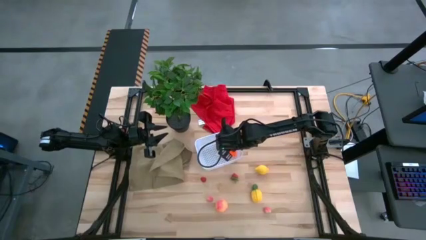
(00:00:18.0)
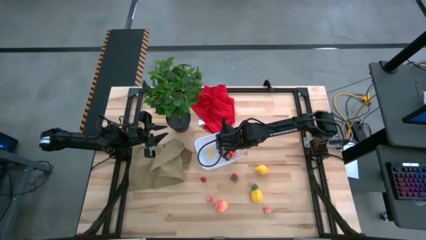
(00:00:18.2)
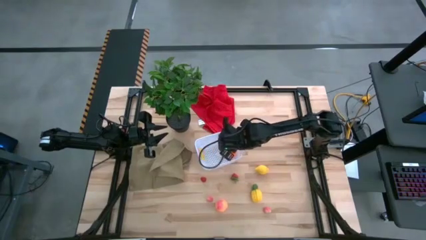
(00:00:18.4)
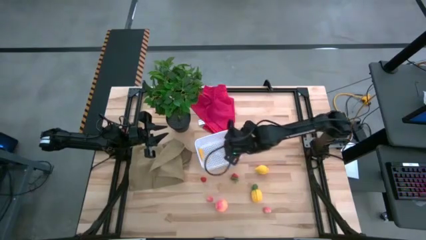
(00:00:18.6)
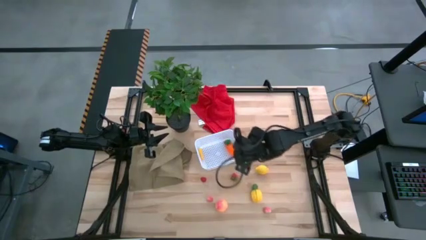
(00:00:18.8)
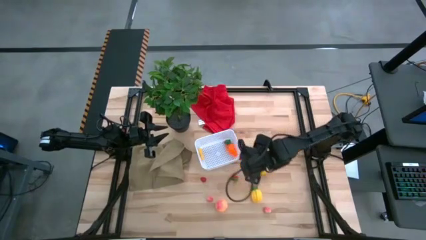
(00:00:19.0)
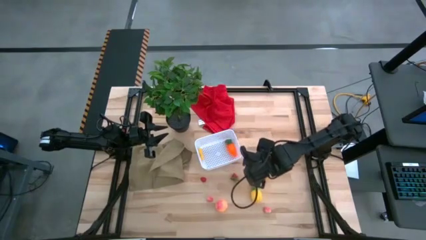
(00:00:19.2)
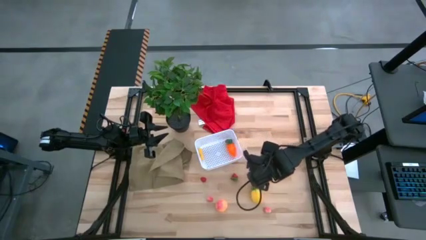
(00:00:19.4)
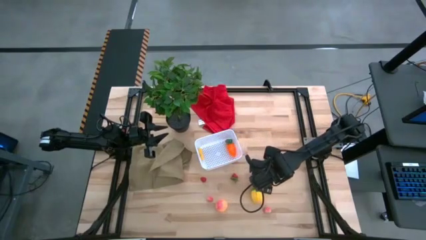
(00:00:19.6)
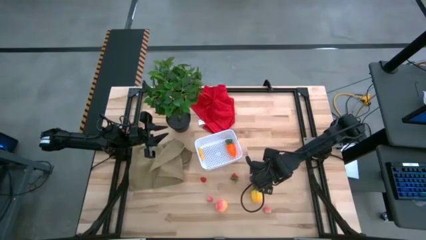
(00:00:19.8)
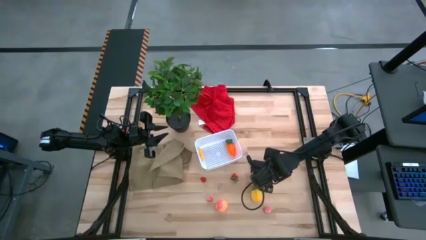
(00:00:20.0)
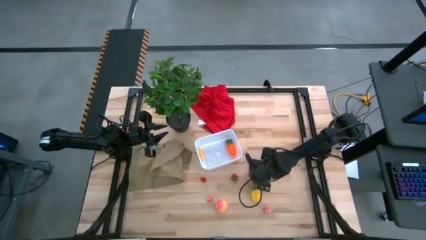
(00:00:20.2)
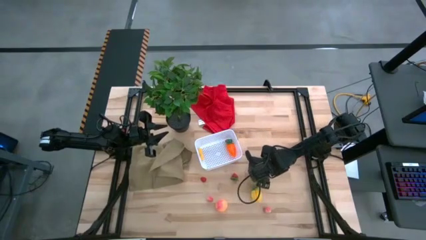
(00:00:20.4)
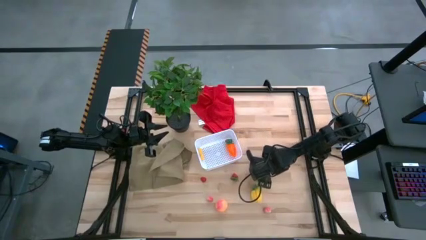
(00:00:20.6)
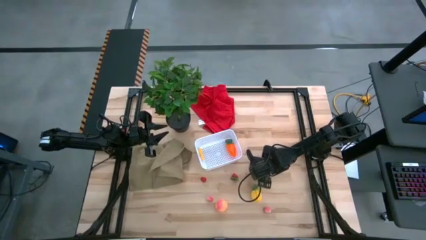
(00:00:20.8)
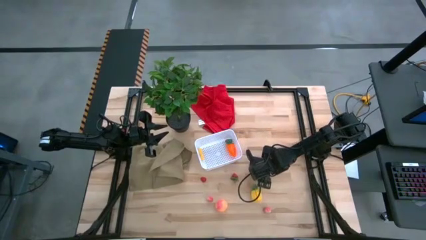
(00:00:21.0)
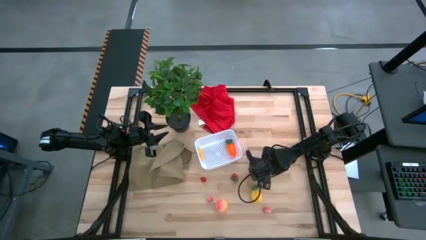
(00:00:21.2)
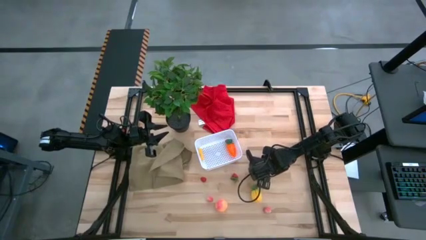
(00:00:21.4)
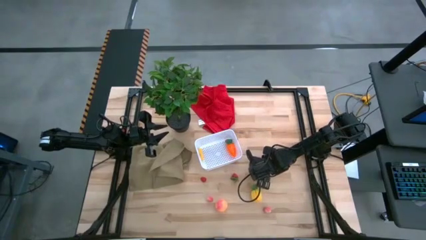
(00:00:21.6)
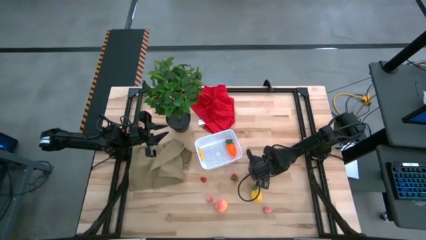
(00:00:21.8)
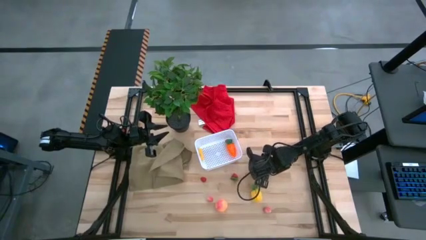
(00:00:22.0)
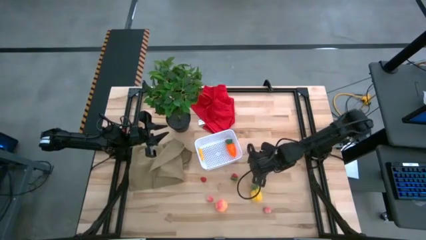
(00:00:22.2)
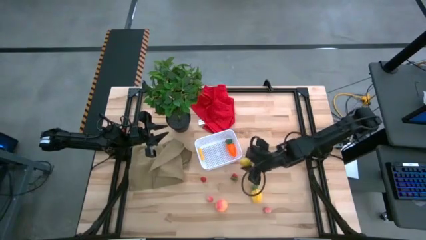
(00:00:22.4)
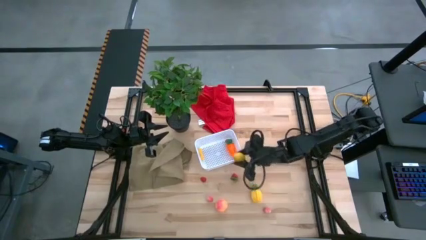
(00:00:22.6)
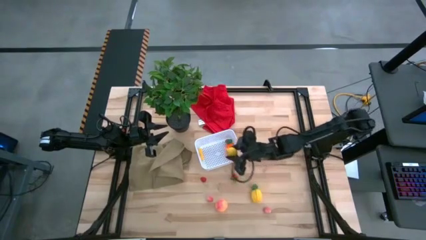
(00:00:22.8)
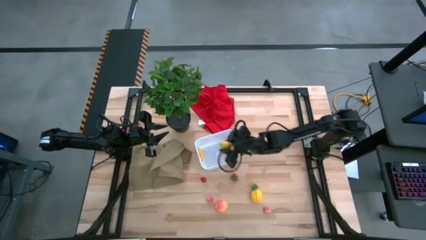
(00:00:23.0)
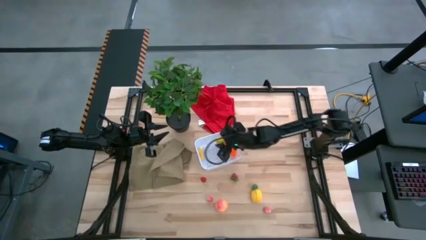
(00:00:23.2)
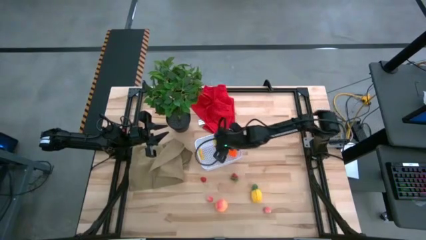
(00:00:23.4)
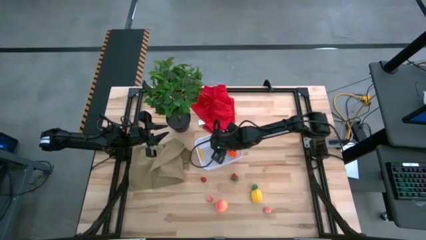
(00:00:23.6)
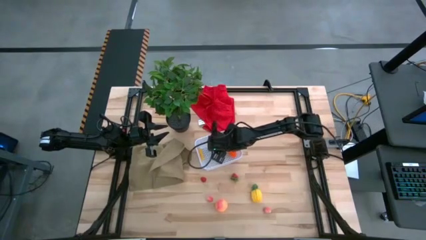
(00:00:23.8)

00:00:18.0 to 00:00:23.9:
Task: Pick and placing Produce into tupperware
Put the yellow lemon into the bin

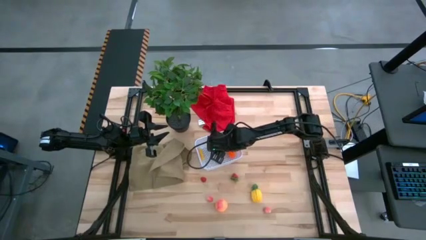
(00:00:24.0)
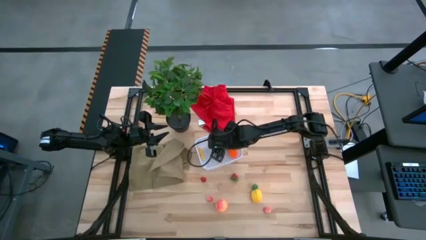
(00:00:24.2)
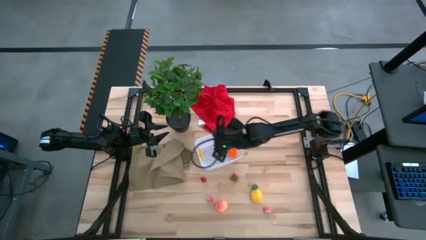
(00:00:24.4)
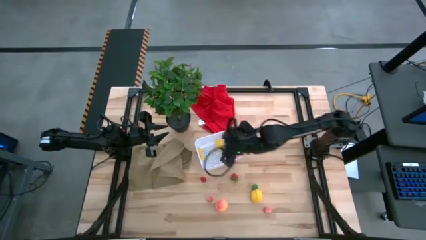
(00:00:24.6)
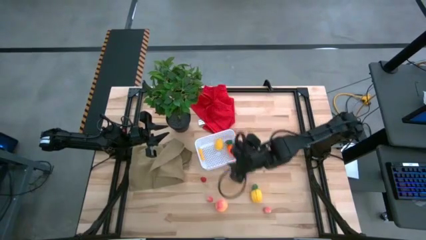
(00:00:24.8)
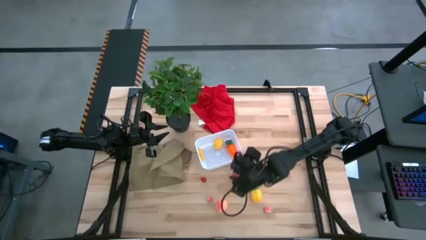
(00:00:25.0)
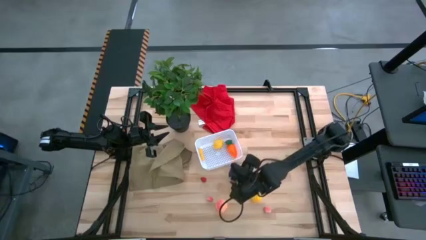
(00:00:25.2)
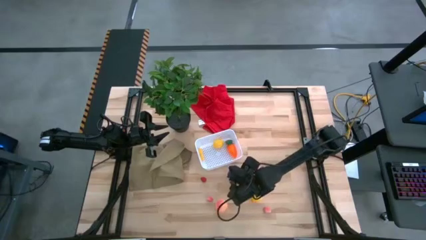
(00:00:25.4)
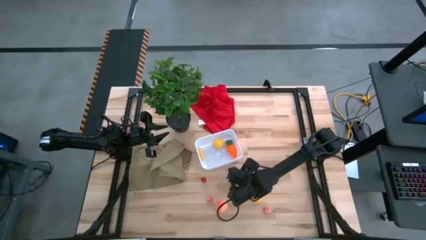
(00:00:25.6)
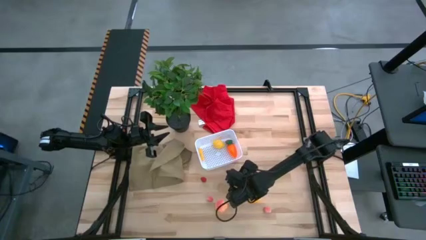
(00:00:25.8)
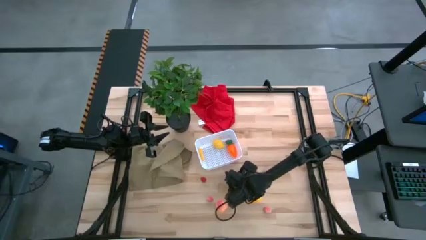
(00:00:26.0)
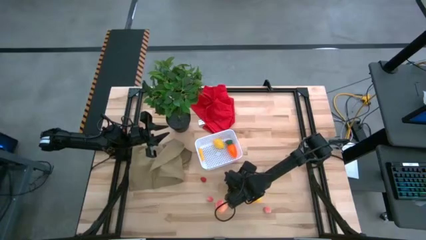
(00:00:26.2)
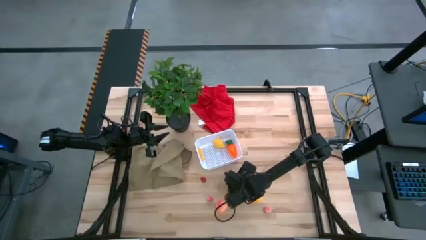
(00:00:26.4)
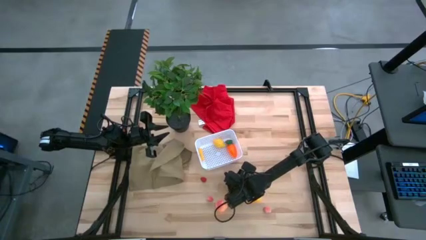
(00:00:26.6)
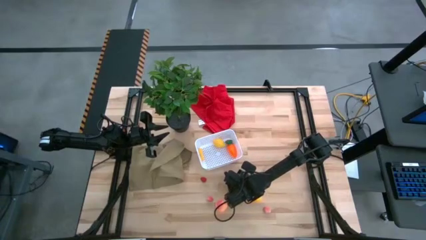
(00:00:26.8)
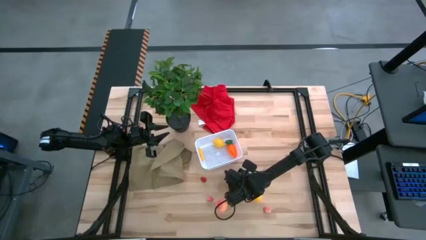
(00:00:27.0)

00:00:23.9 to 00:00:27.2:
Put the red strawberry into the bin

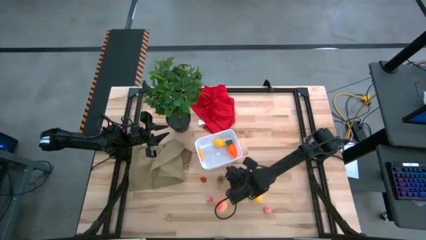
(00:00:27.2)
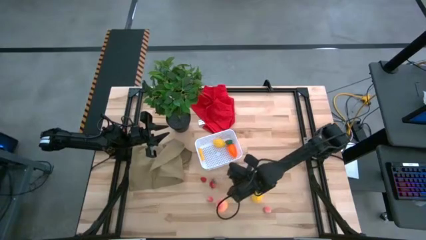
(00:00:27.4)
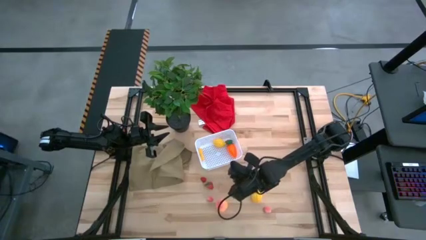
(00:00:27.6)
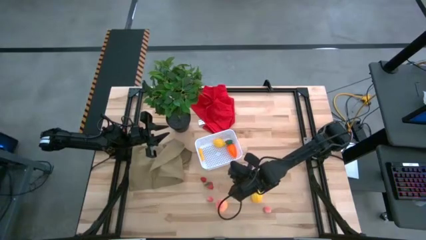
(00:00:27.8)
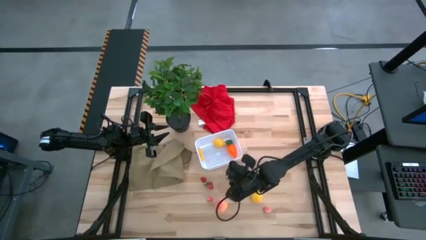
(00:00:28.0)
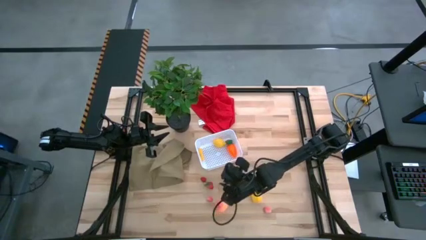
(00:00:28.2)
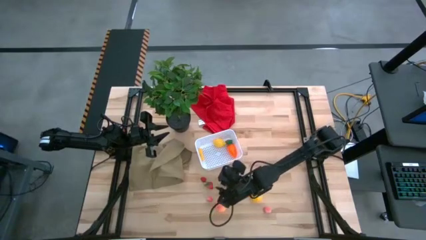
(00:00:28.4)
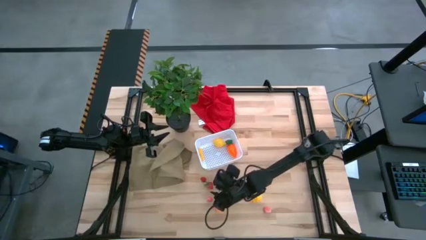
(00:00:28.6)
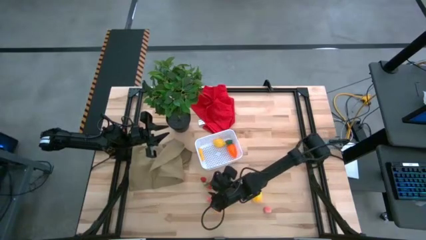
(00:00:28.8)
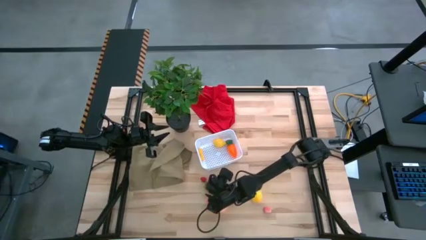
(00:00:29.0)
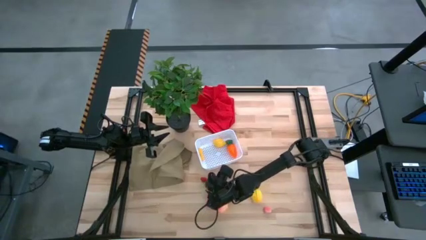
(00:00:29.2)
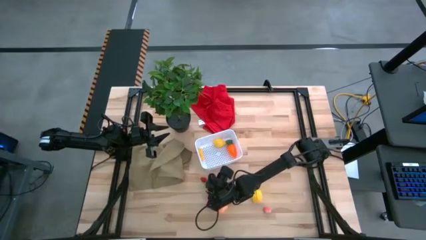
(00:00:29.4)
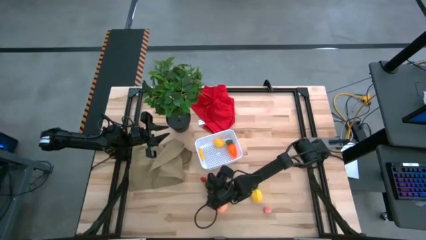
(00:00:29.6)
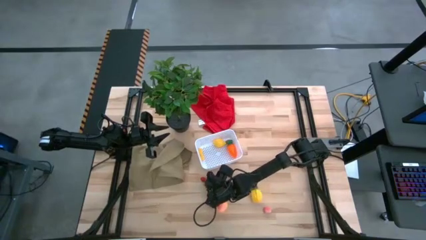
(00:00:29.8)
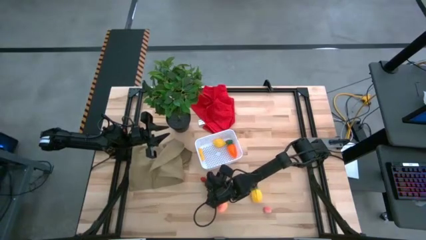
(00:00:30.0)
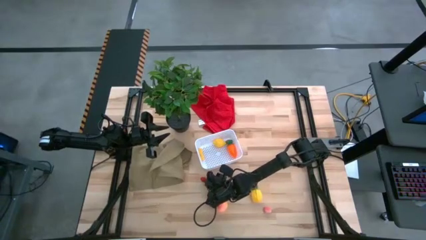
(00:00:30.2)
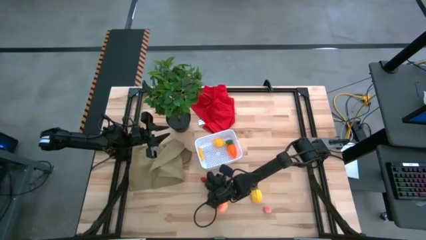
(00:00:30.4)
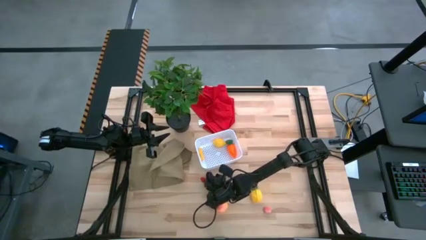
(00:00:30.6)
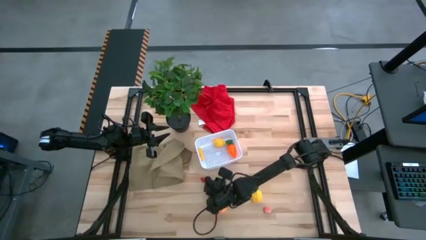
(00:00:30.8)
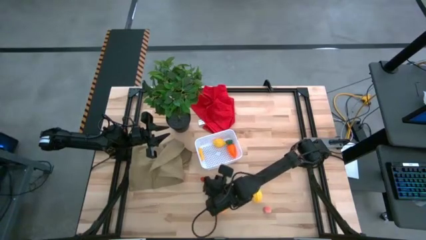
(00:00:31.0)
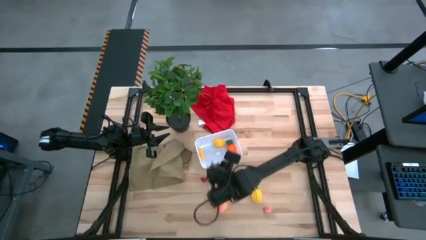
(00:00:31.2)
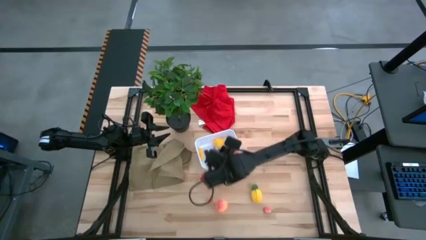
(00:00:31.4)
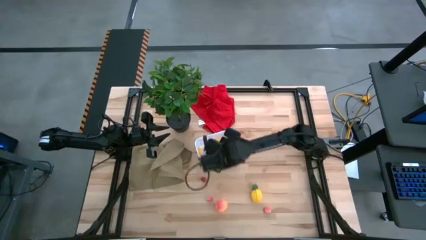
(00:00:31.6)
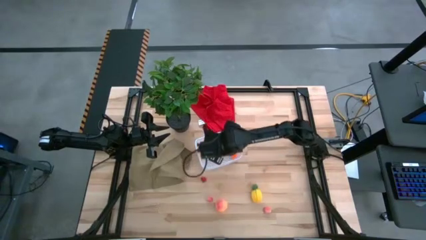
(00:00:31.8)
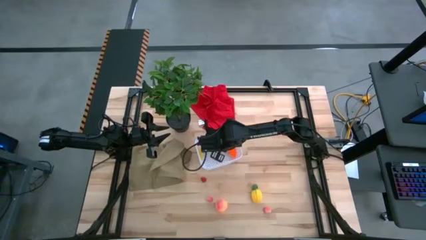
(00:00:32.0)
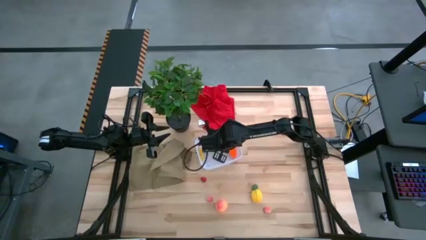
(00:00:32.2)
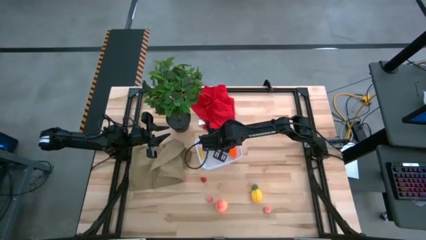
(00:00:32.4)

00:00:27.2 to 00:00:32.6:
Put the red strawberry into the bin

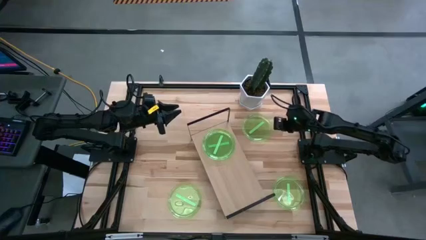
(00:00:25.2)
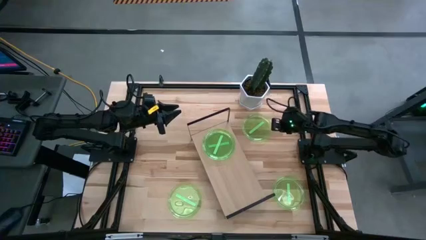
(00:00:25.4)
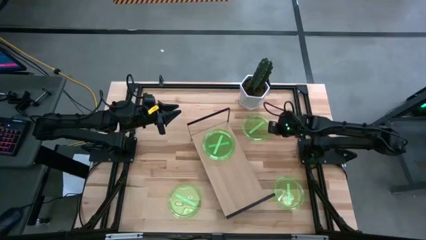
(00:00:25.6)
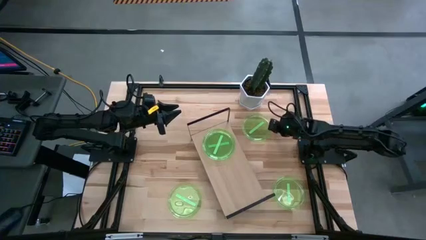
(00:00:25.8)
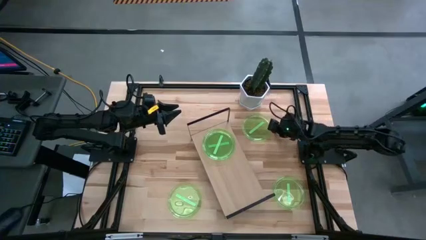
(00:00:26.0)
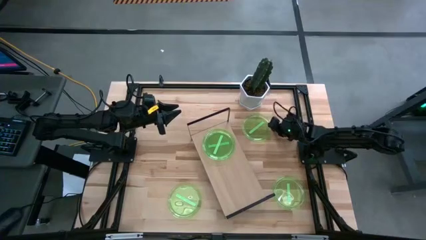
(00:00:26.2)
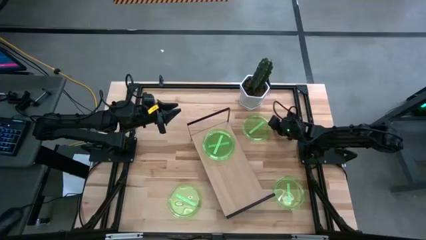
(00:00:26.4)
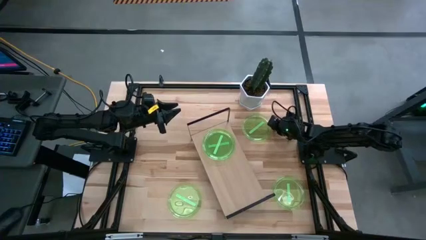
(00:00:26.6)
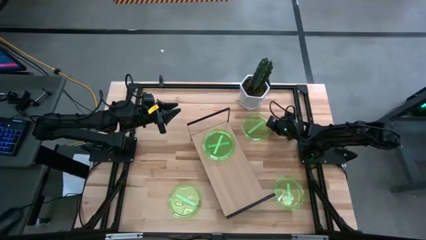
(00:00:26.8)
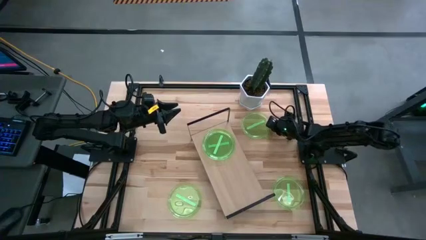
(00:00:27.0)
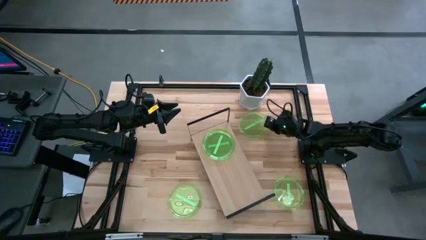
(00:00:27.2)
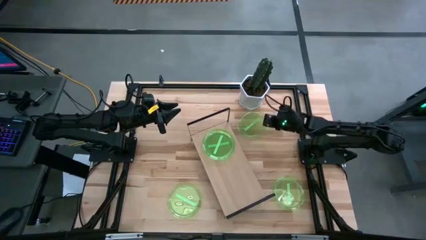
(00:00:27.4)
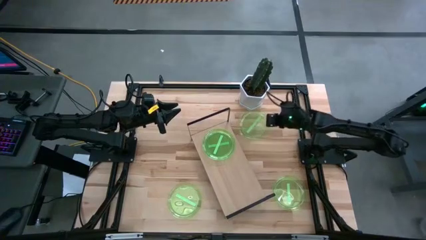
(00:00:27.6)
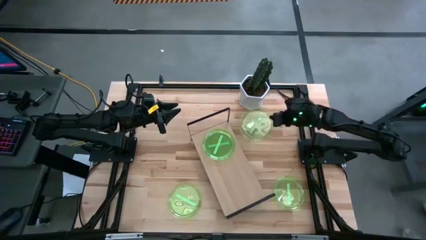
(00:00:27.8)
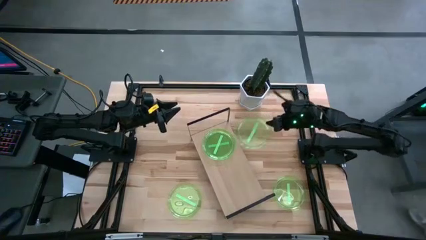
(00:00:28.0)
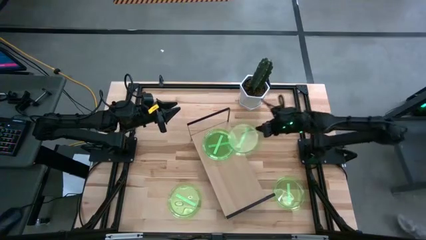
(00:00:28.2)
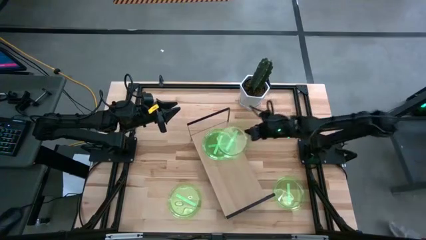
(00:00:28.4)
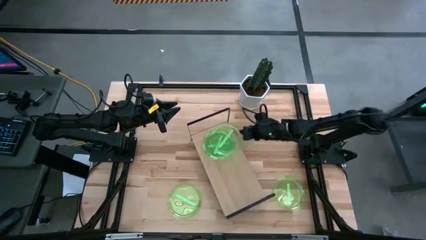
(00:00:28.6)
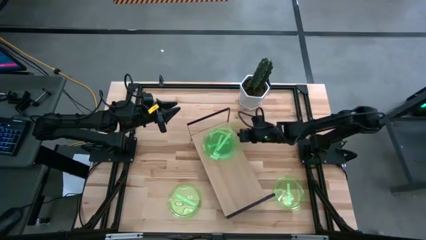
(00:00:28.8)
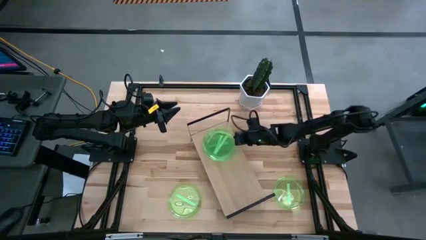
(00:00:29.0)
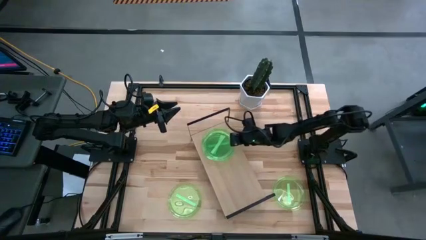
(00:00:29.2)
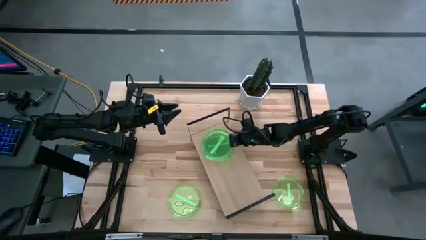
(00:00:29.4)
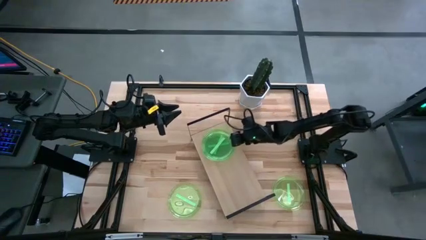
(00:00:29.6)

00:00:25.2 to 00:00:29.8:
Task: Place and stack plates onto a shelf
Stack the top green plate on top of the green plate on the shelf
